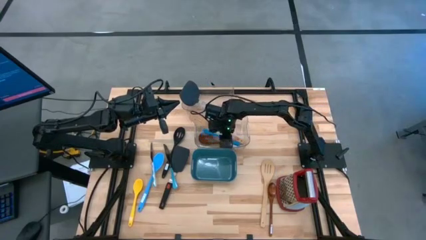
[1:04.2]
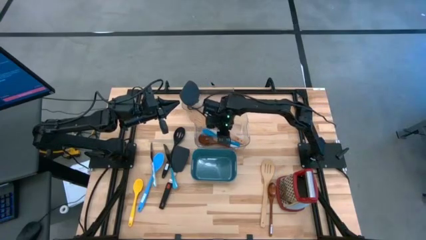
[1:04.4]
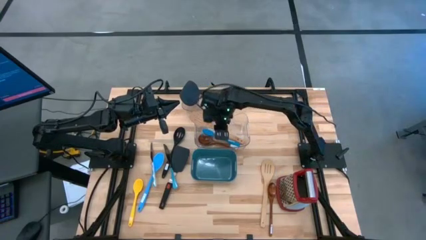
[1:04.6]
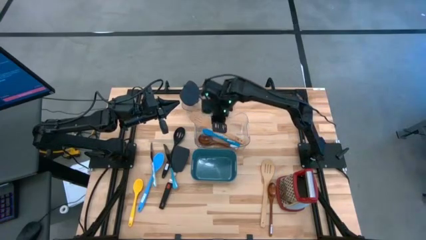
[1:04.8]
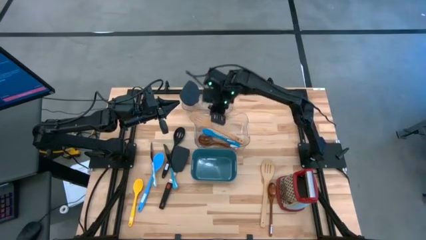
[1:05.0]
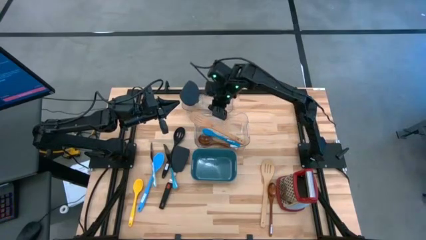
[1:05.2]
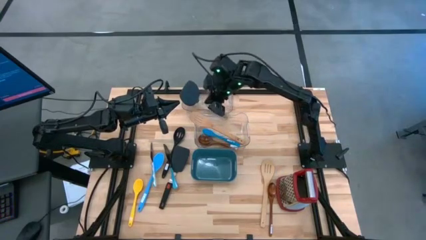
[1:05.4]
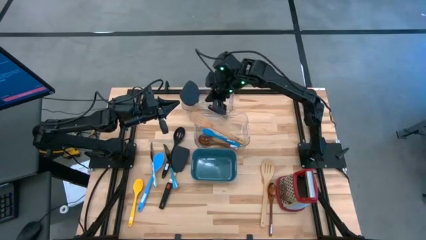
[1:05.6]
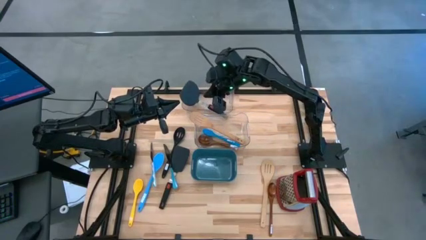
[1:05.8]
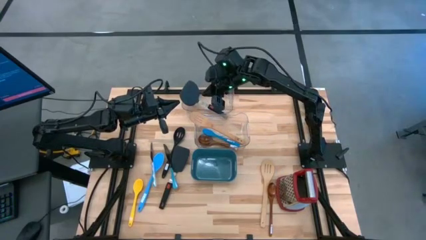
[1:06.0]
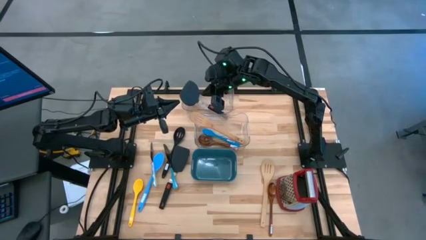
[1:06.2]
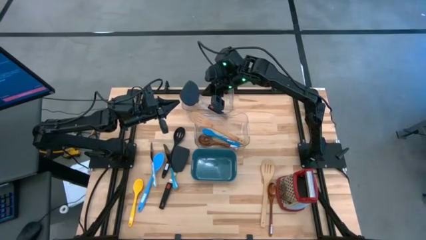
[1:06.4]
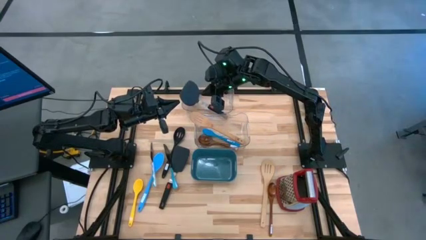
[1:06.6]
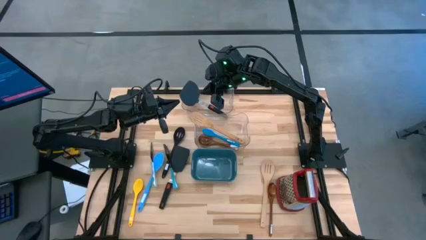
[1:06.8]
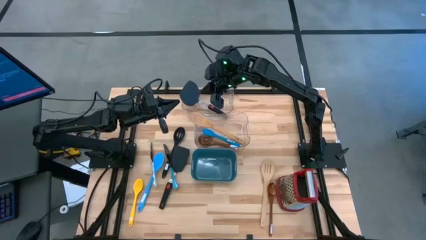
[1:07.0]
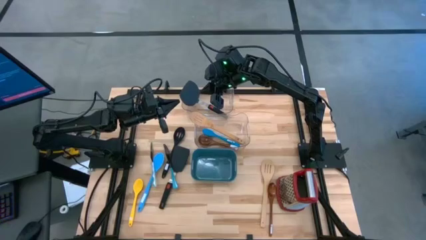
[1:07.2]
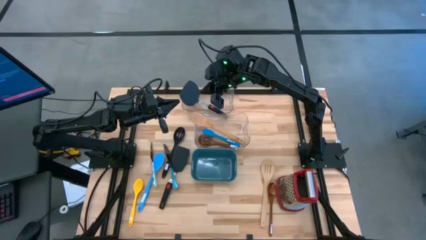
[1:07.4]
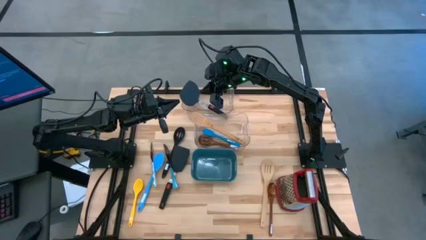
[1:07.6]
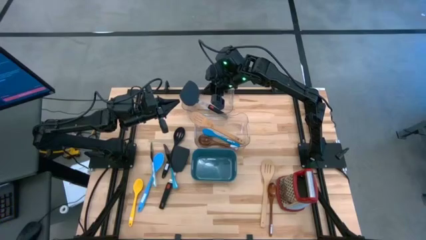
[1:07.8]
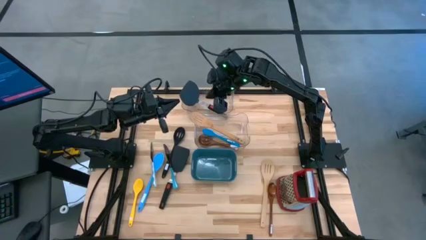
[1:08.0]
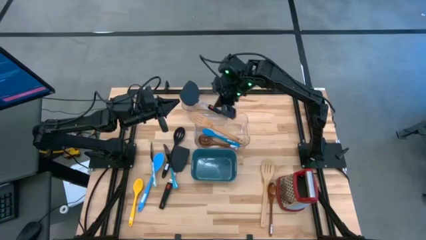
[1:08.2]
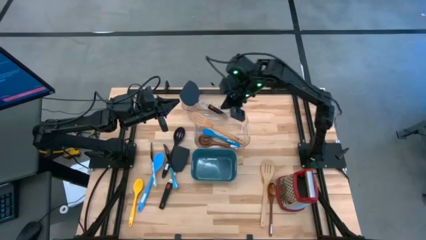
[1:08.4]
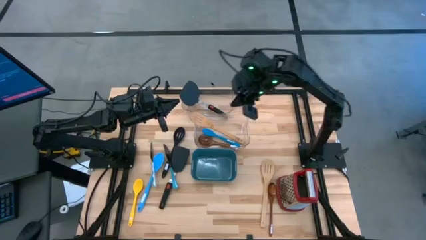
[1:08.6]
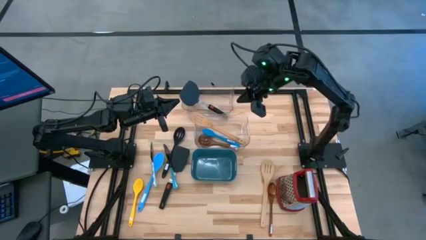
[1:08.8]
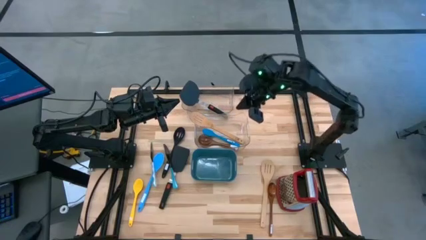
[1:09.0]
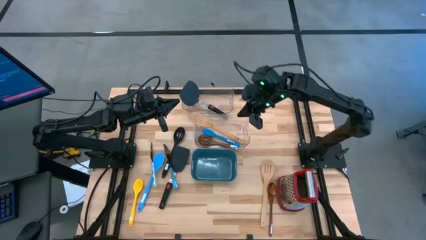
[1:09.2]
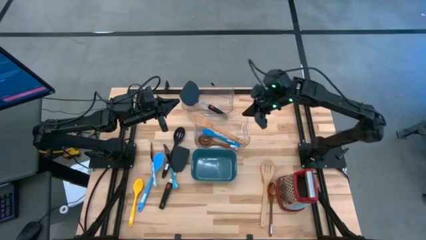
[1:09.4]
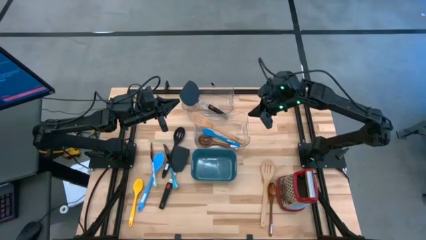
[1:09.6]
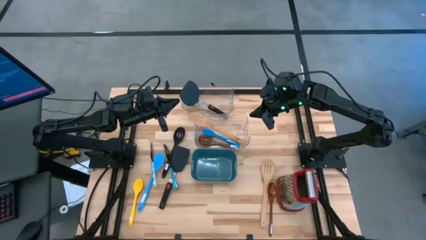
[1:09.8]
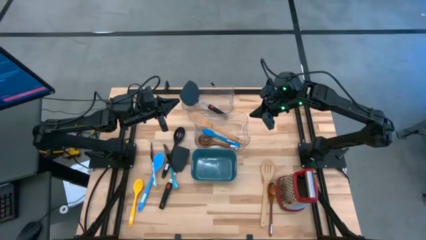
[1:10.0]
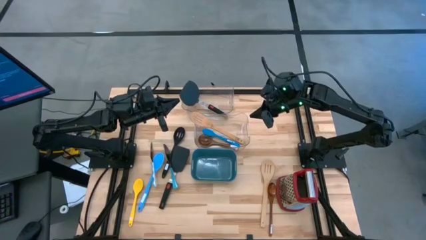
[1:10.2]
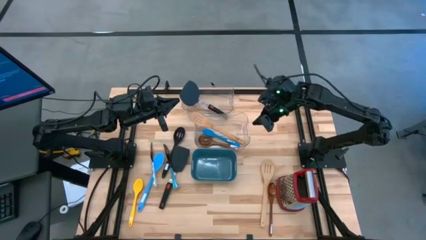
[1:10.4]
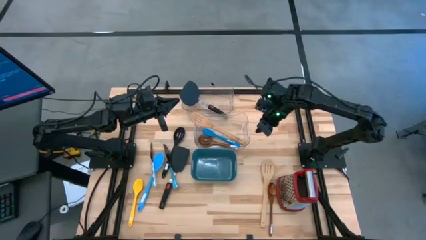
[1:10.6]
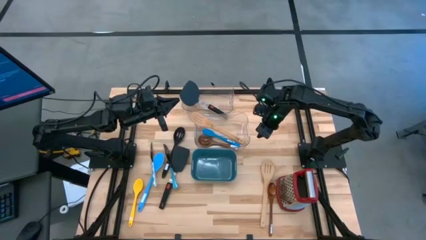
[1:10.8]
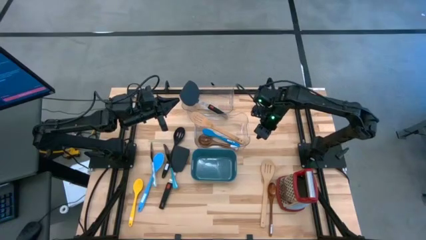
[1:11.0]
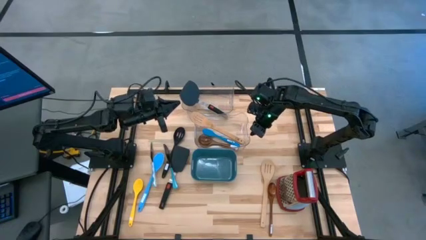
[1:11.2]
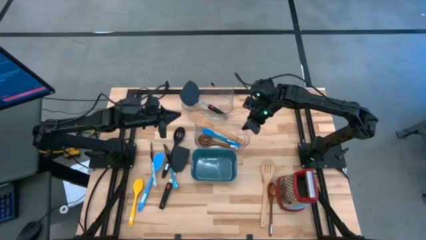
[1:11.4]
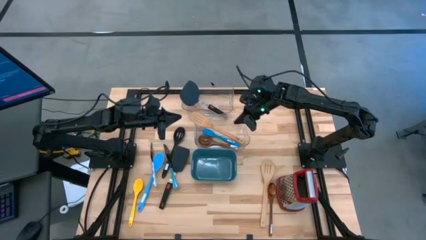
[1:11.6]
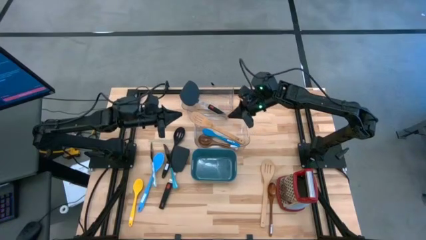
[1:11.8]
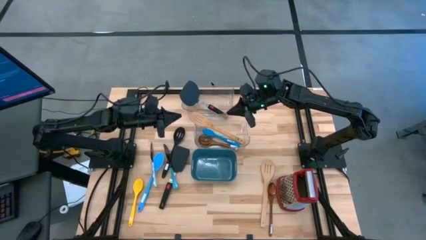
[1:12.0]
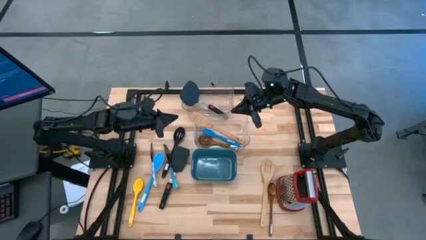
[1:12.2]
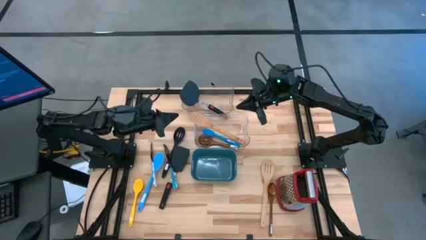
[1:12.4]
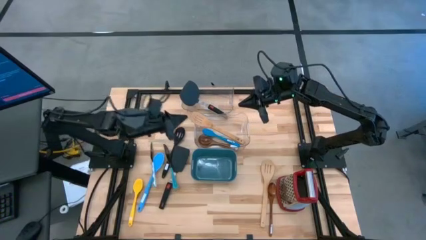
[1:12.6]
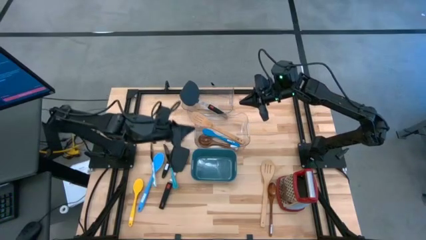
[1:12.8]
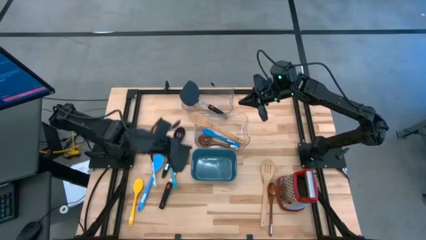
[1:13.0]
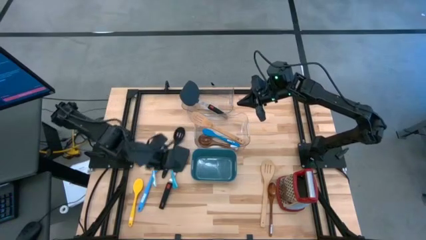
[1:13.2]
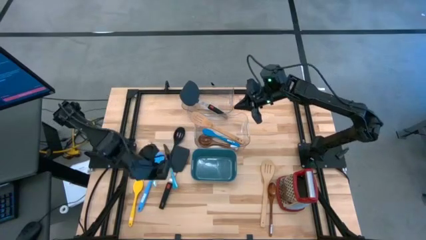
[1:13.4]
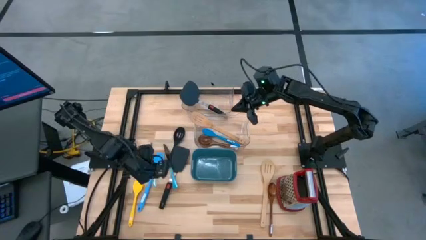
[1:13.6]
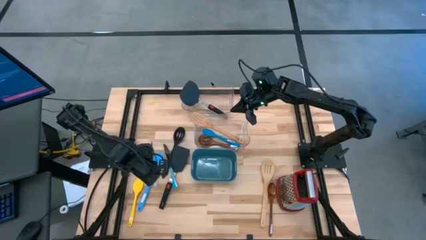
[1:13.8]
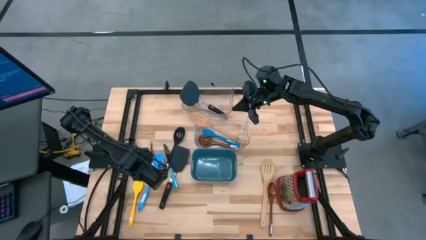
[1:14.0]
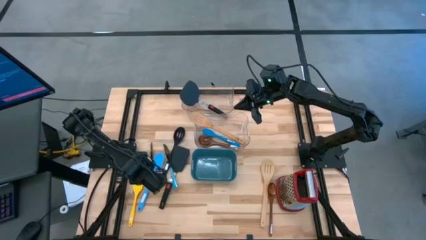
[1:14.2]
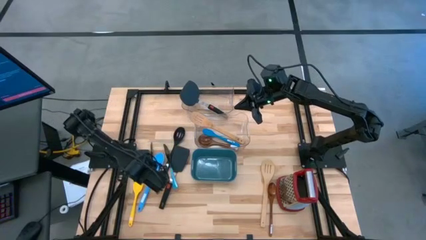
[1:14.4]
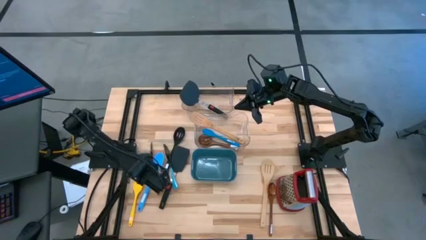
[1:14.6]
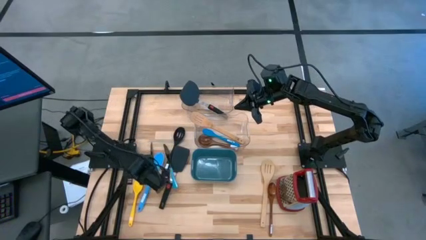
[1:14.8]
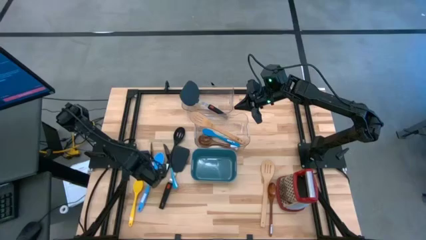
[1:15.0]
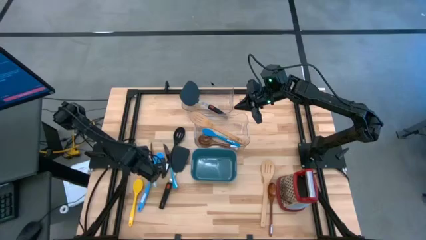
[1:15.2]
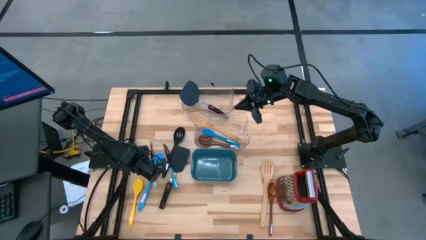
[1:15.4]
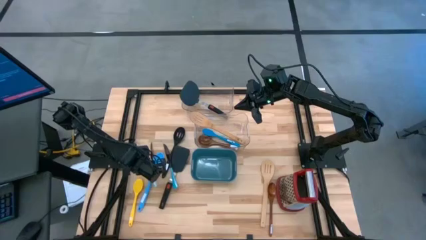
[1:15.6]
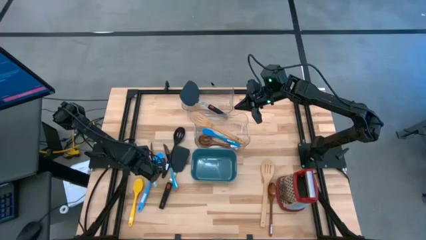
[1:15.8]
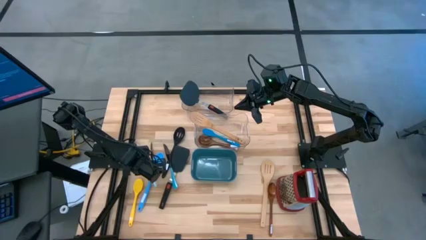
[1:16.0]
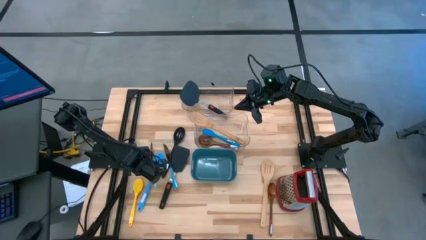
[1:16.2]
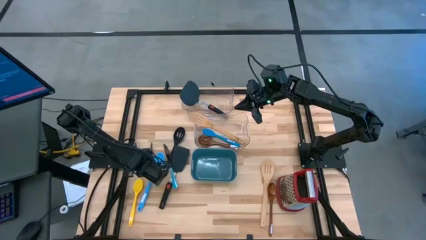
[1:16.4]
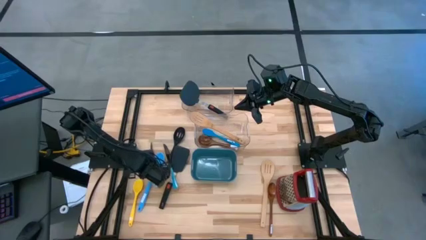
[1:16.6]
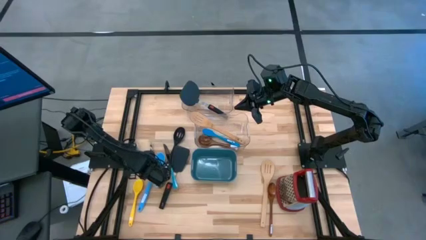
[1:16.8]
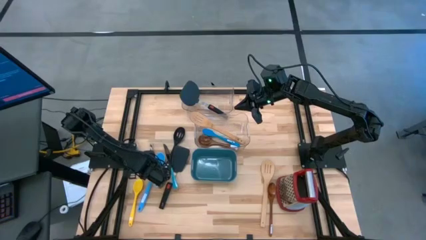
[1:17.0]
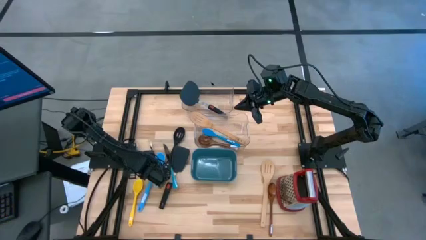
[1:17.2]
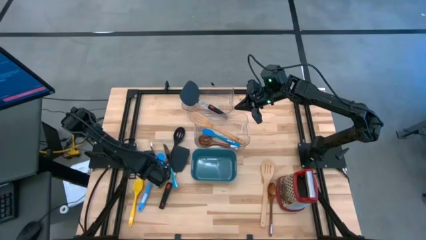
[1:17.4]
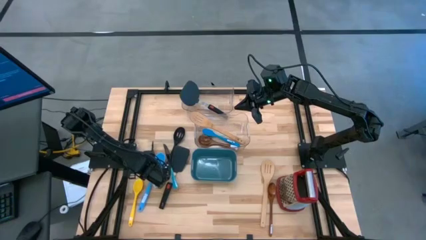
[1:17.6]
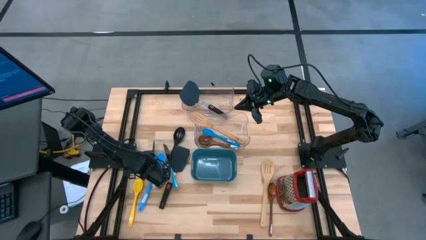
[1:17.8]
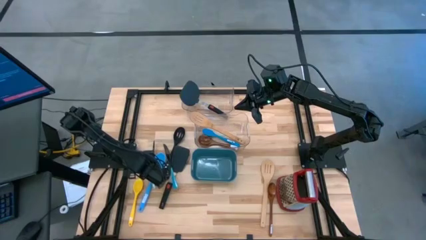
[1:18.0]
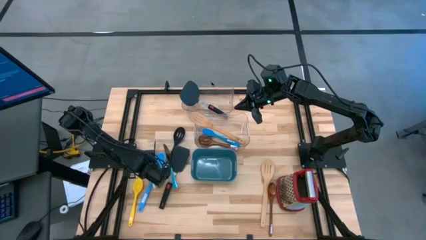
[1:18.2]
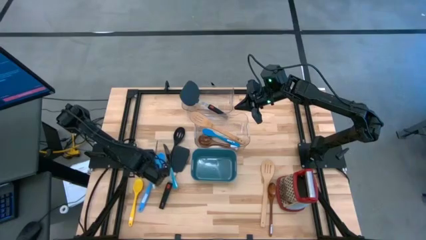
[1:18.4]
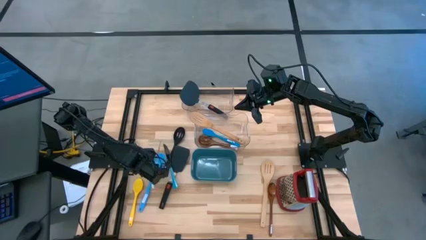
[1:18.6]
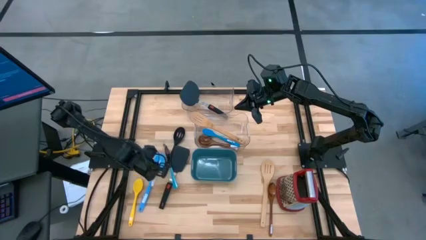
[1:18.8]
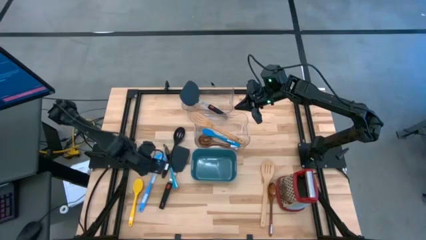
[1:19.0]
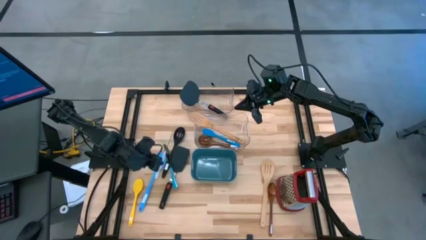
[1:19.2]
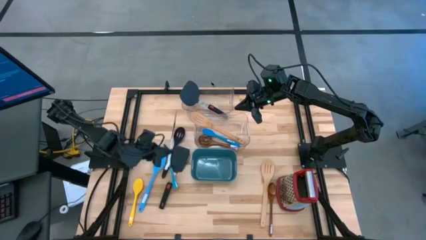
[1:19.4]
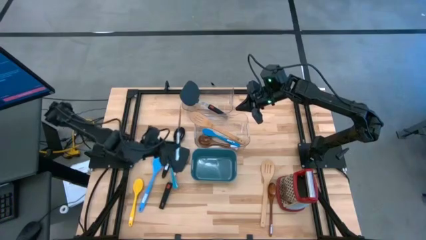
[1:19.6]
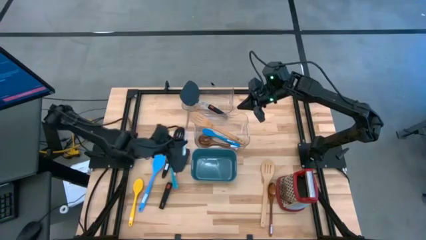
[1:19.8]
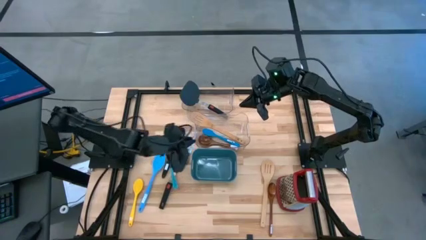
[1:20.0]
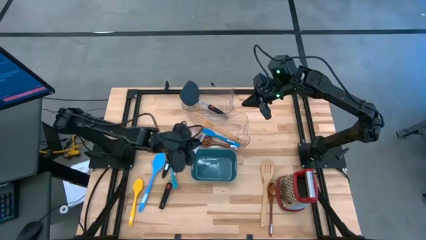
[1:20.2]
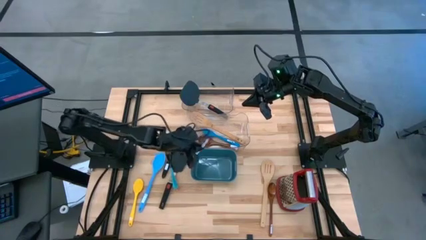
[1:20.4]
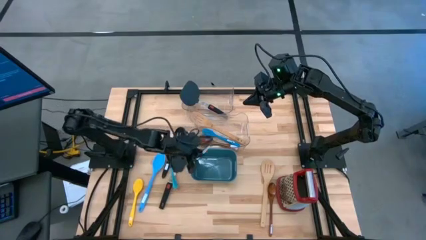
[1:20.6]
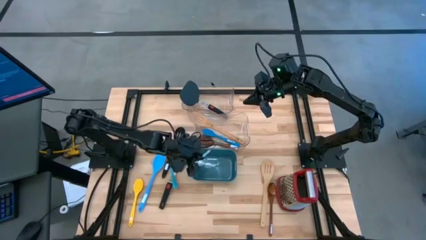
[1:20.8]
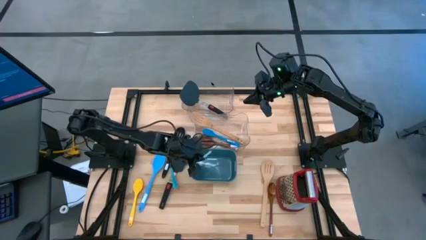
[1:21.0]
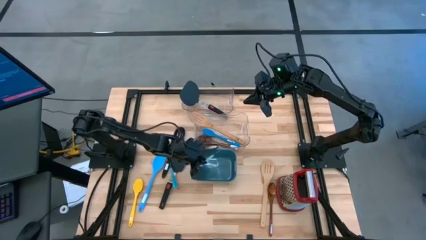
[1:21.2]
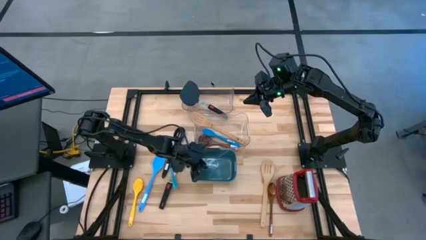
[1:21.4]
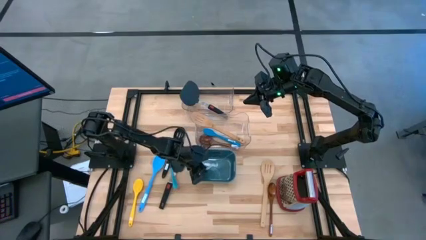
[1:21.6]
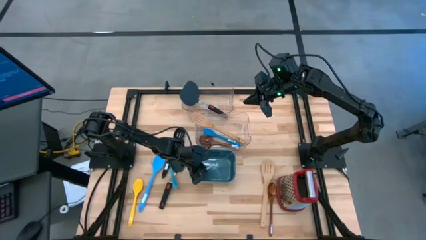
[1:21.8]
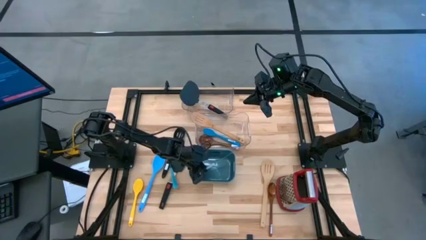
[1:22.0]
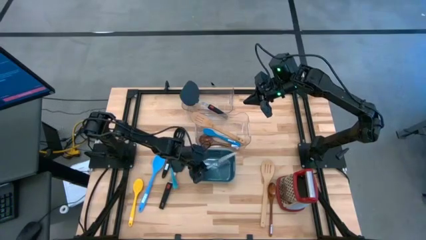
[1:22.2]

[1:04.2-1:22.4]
Task: Pick & Place Kitchen Items
Put the patterned blue table knife into the blue bin
